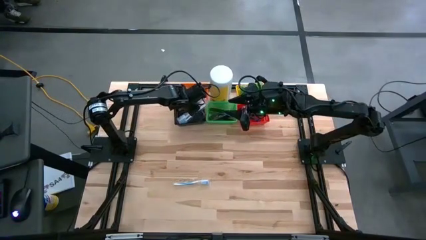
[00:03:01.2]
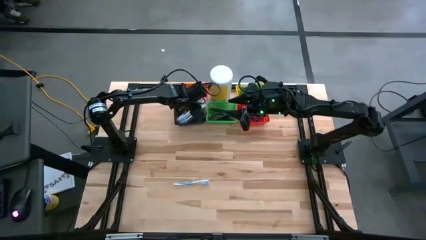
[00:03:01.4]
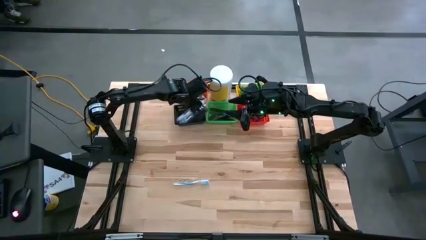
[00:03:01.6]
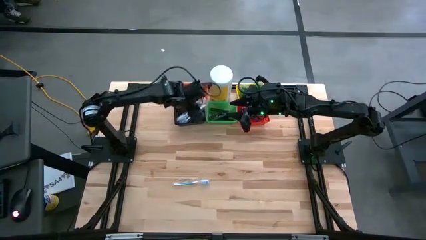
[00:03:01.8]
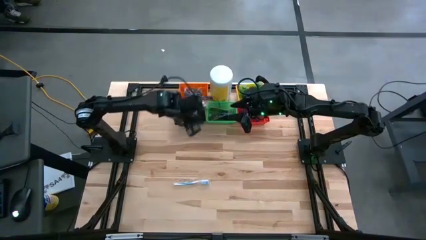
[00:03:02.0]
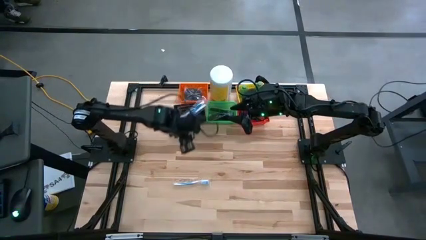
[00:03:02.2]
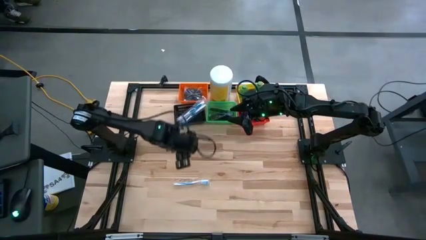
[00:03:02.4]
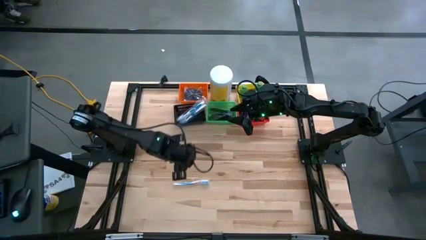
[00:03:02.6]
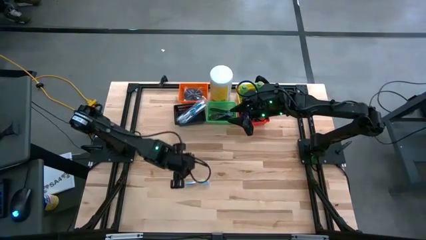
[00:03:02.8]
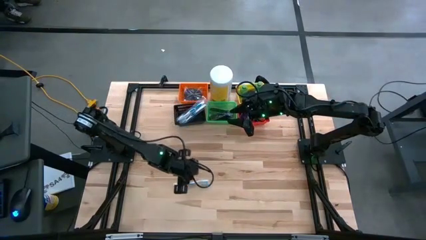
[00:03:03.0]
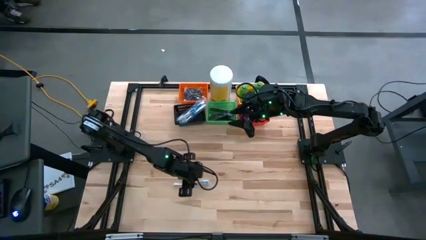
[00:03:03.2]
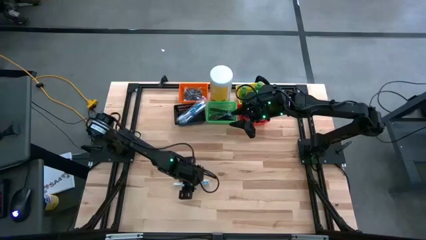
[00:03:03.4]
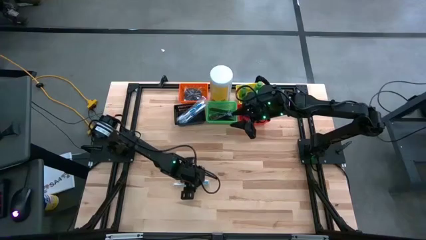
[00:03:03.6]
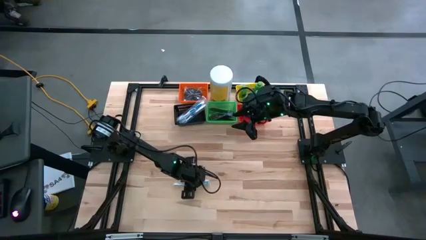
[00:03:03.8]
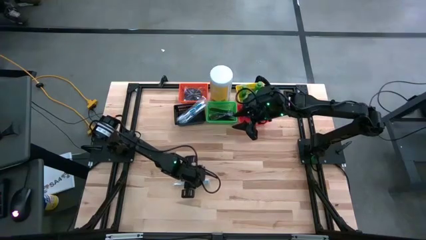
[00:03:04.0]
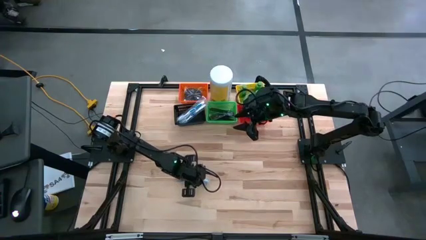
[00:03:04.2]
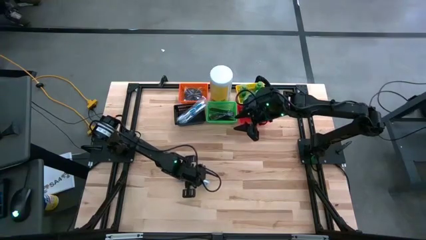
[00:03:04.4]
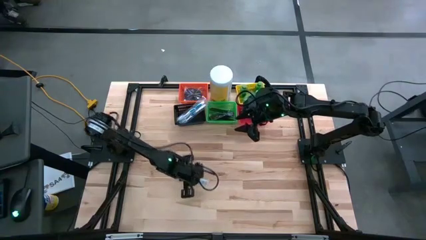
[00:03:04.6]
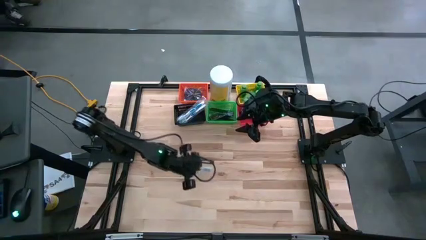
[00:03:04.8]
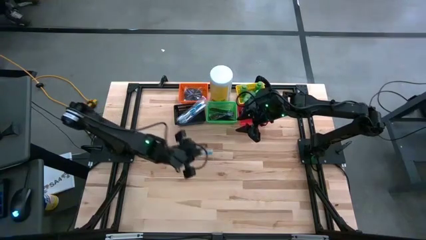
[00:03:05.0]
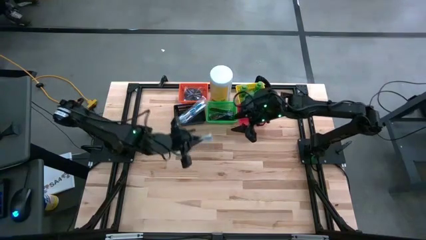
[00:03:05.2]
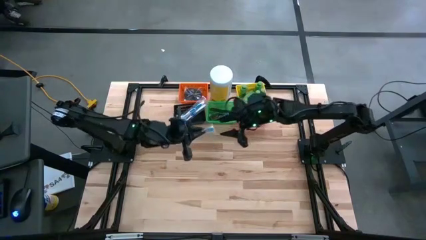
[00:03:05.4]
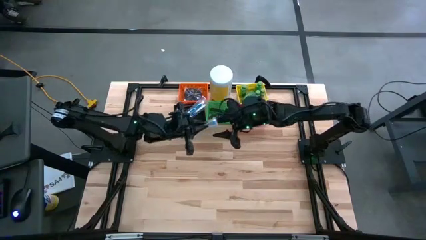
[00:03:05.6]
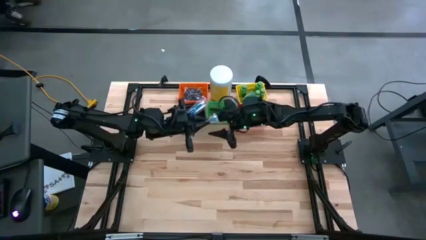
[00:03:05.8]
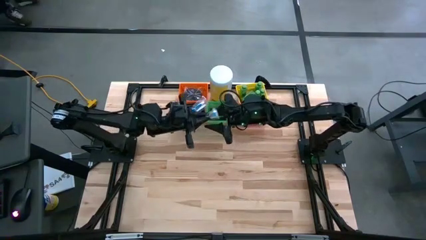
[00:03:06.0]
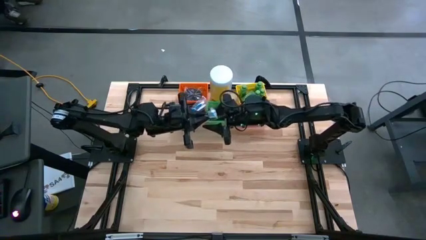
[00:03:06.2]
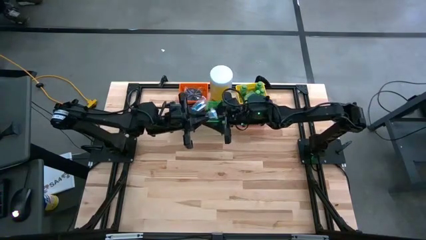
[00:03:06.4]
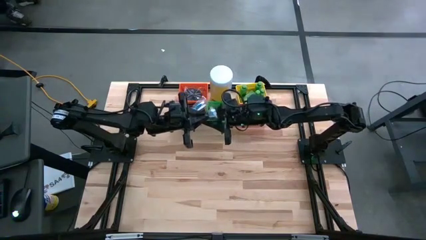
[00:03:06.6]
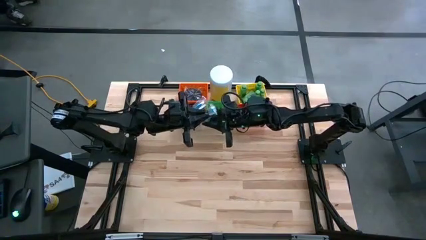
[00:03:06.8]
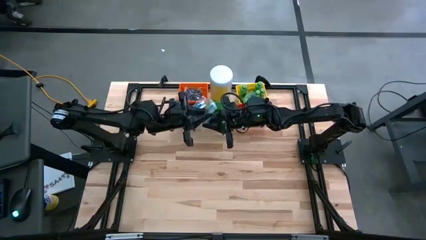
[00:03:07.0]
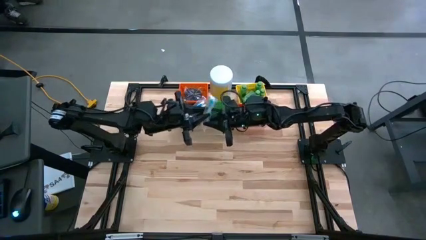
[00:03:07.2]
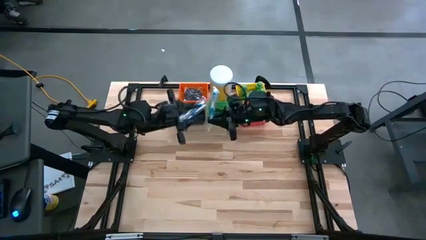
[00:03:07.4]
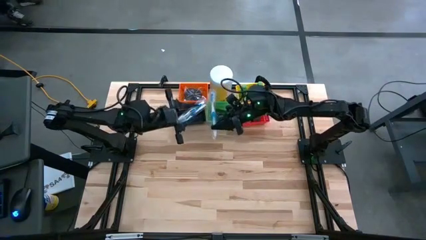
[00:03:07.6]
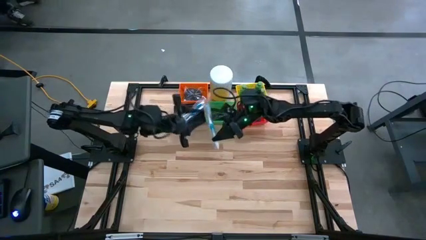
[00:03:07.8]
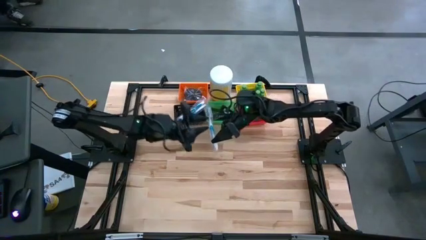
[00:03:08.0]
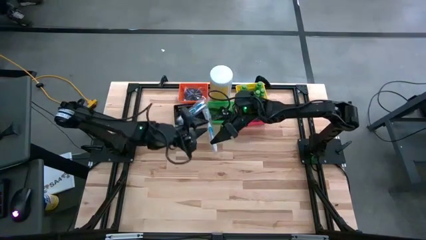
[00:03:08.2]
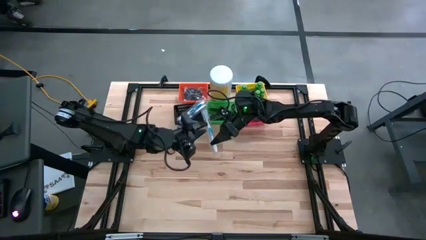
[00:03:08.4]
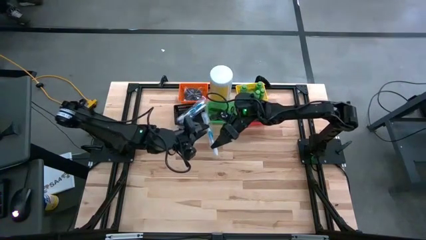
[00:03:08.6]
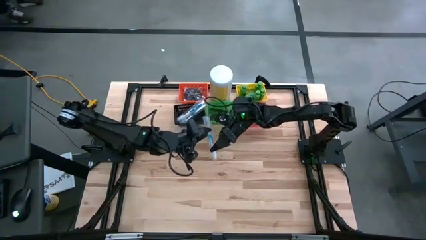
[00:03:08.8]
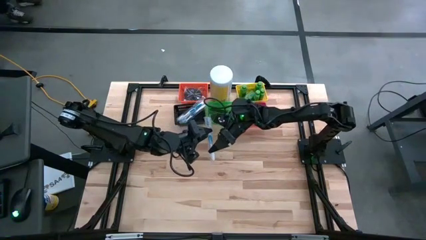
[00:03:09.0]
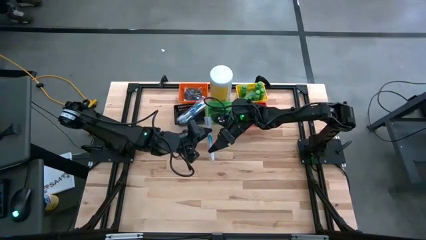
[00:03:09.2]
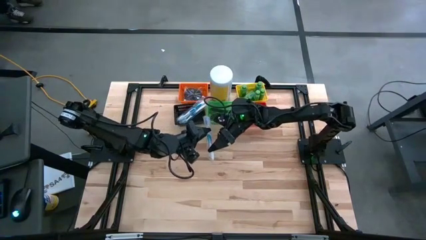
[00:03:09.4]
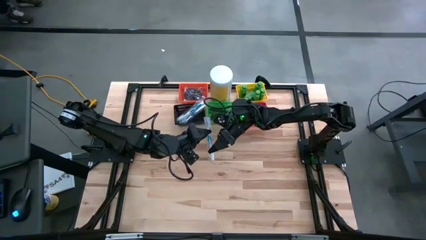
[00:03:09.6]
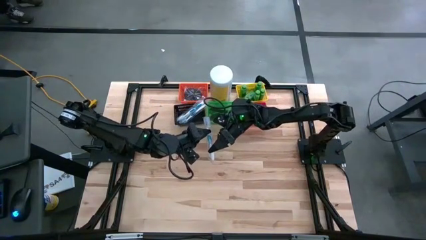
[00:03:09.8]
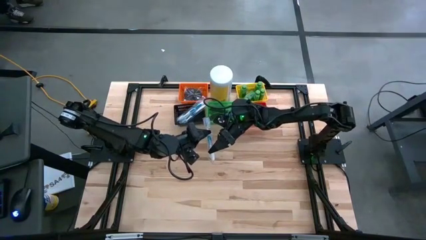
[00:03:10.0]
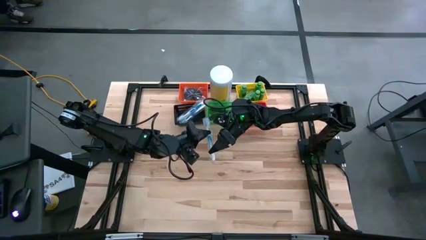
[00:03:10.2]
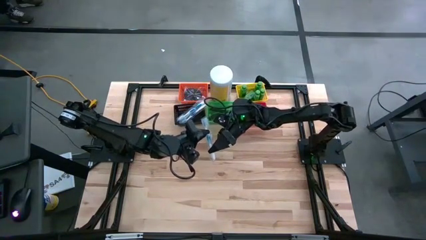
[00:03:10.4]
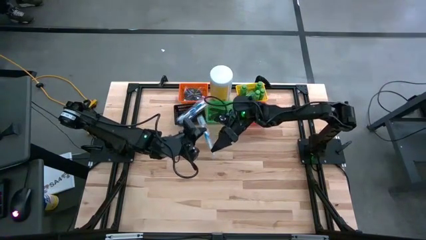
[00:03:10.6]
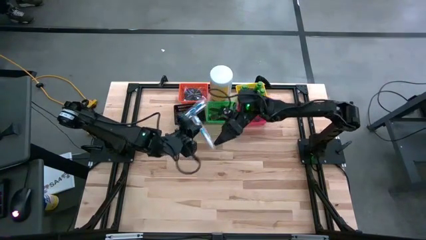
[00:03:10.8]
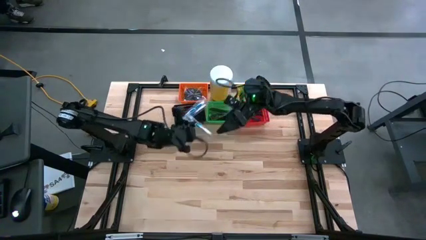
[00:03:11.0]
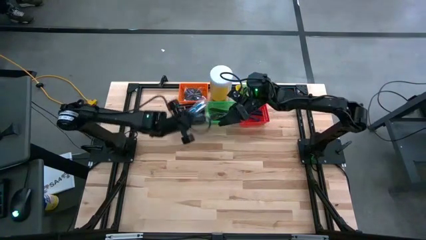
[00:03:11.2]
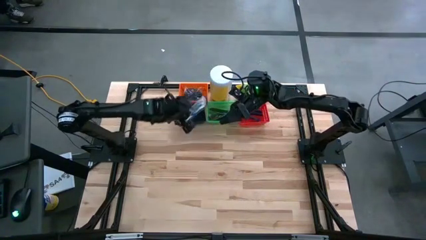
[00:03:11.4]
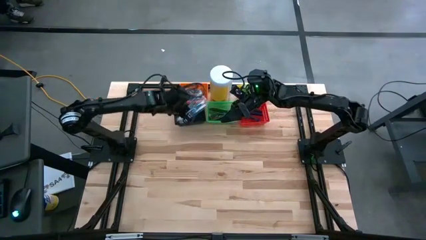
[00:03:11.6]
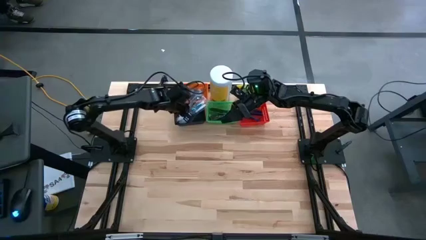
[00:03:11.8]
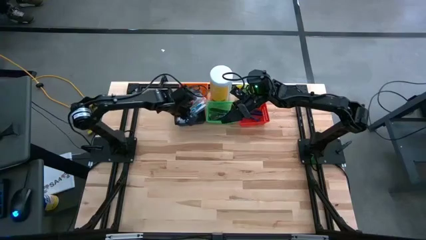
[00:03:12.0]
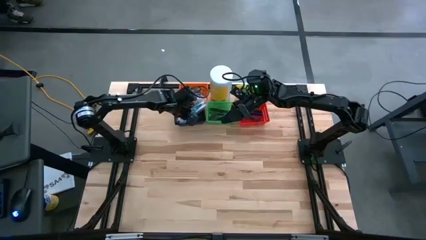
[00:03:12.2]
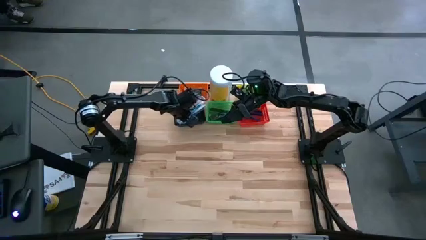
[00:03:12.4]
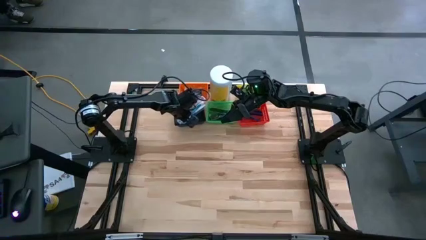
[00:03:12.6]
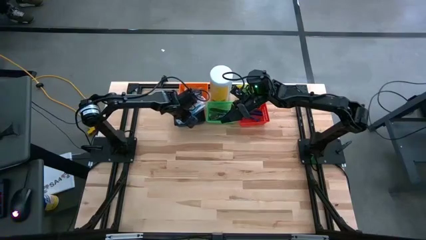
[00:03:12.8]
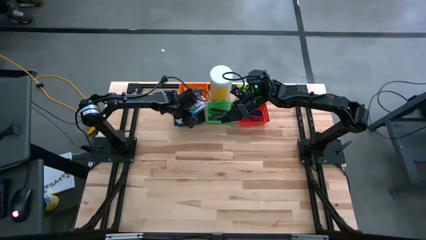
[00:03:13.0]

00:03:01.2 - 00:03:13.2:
Task: Pick & Place Travel size toiletries
Put the blue toothbrush into the black bin

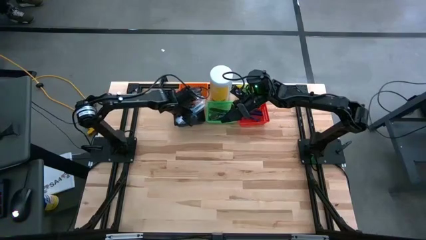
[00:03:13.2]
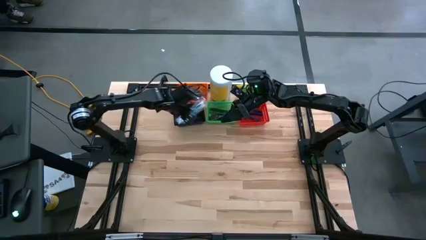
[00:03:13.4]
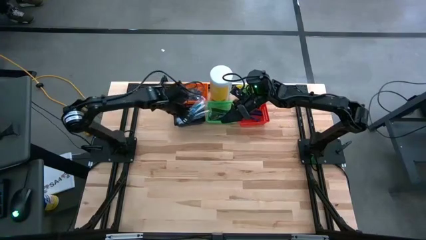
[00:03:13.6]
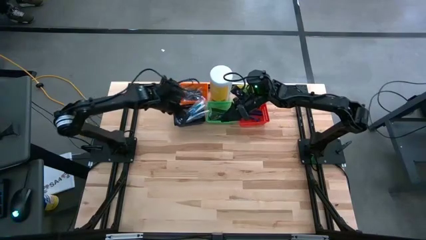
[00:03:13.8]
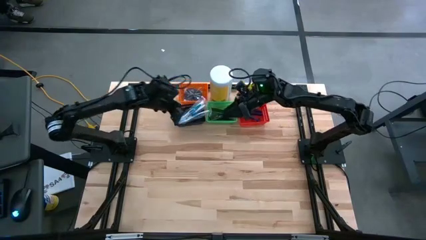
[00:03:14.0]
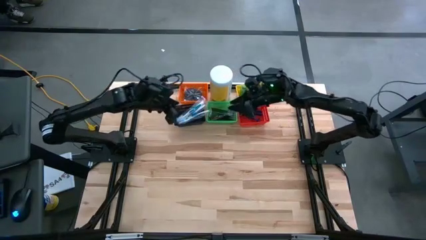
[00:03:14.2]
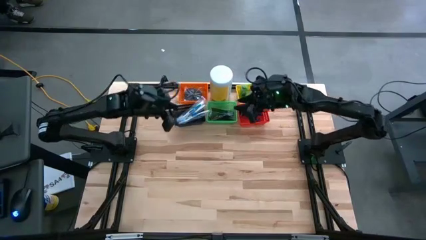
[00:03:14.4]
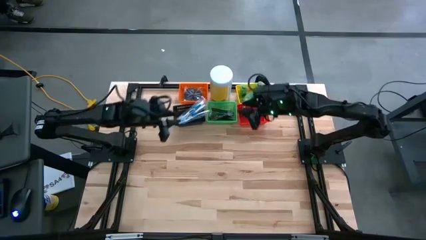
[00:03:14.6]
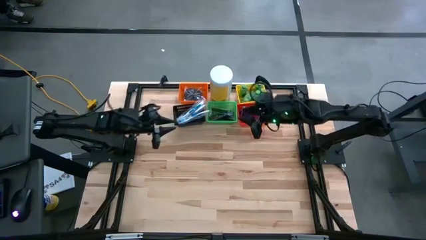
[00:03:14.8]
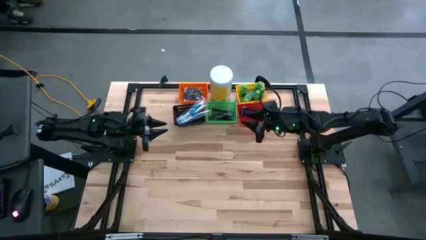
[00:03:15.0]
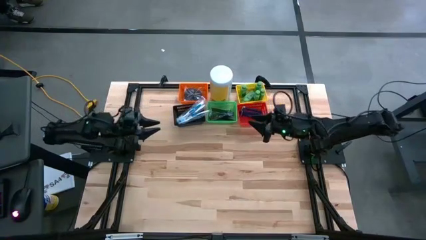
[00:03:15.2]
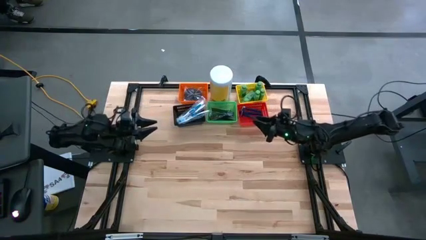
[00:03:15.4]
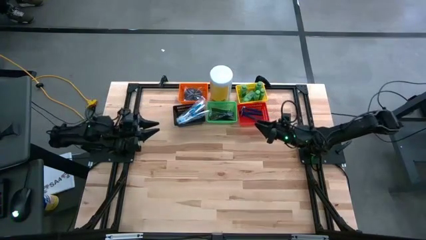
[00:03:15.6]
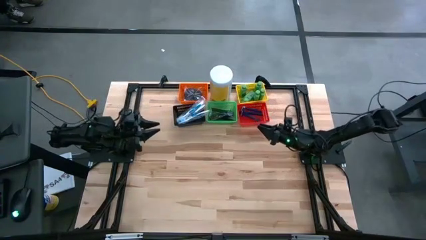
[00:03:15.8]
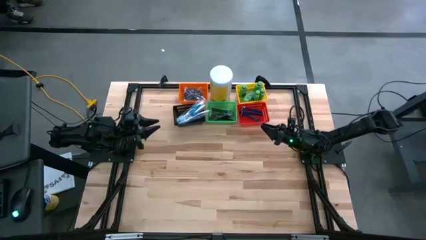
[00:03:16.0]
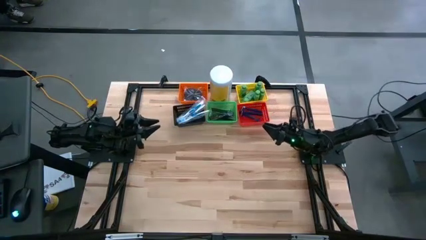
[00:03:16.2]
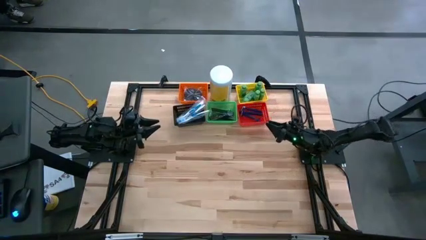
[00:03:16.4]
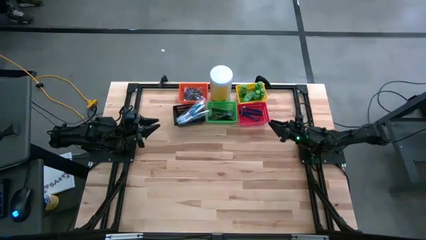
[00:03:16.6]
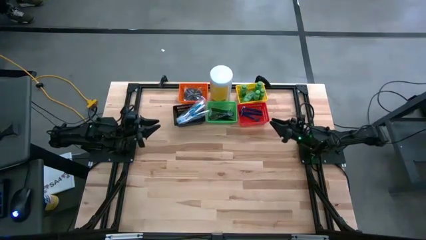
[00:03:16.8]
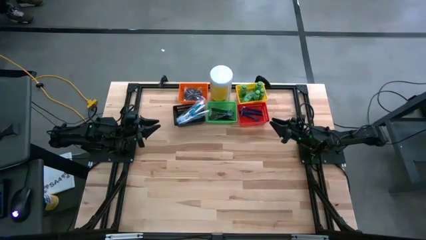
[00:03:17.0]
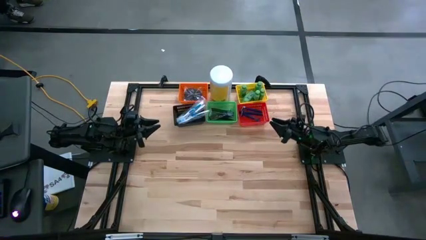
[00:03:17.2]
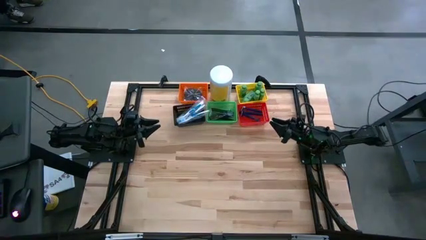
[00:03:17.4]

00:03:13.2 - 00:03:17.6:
Return to Home Position
